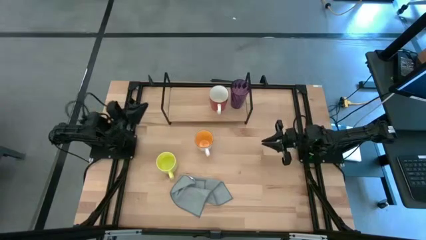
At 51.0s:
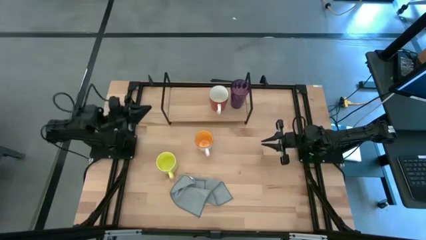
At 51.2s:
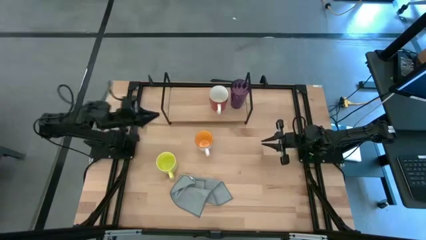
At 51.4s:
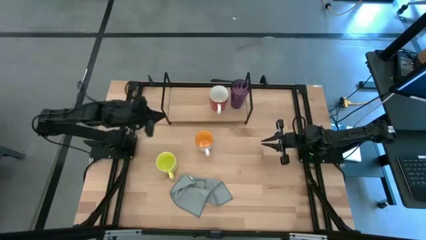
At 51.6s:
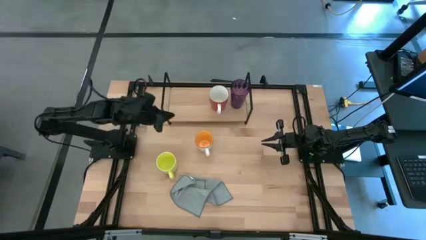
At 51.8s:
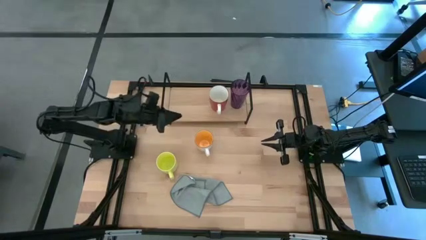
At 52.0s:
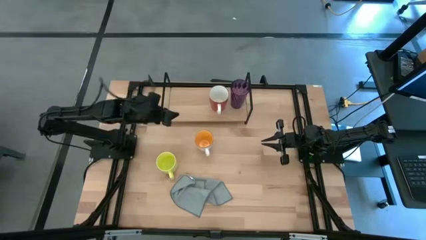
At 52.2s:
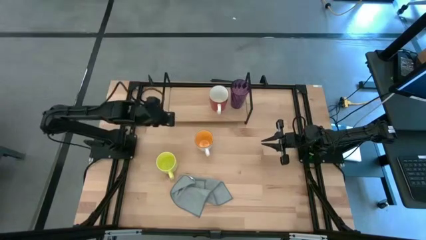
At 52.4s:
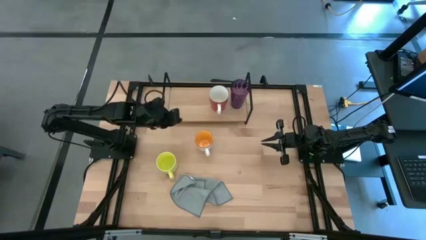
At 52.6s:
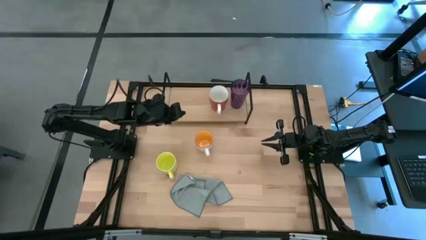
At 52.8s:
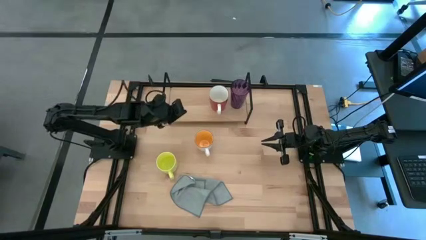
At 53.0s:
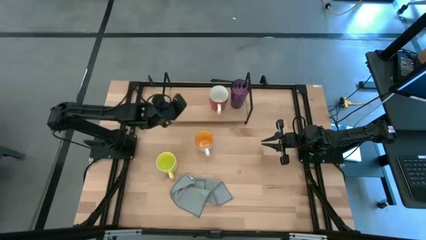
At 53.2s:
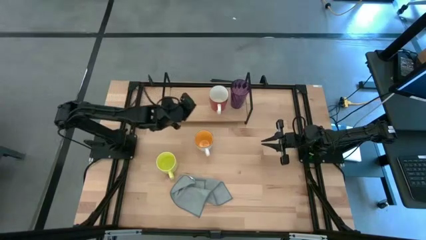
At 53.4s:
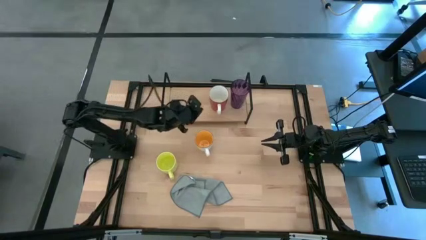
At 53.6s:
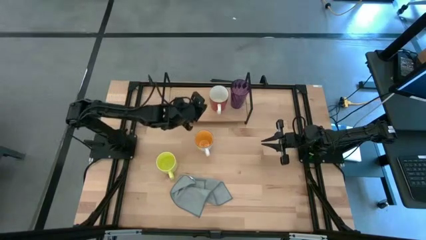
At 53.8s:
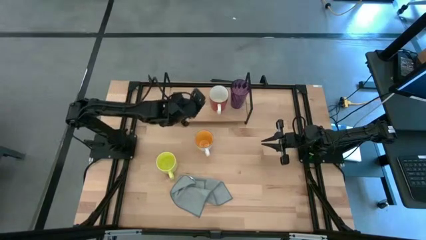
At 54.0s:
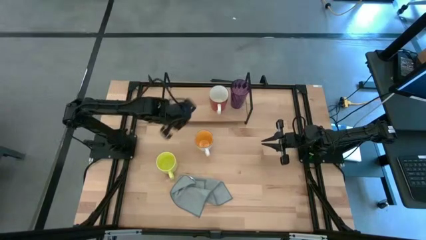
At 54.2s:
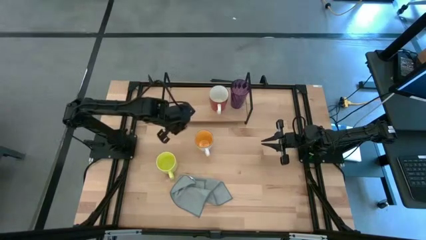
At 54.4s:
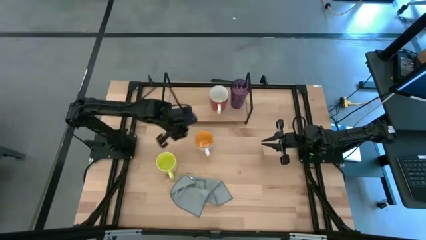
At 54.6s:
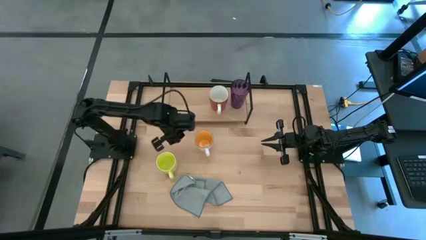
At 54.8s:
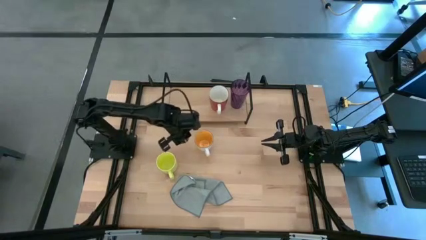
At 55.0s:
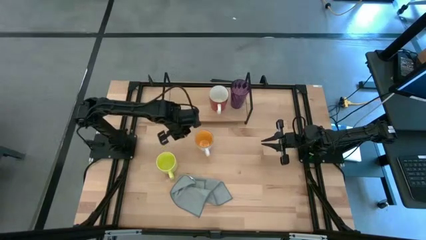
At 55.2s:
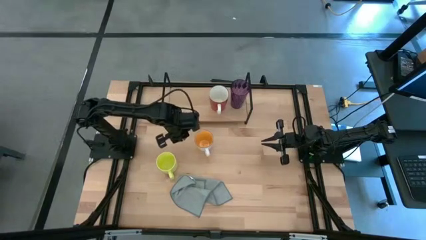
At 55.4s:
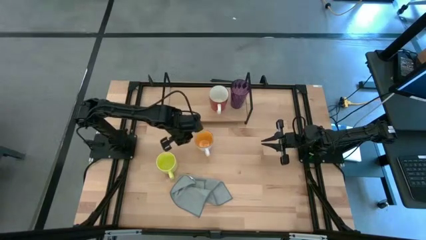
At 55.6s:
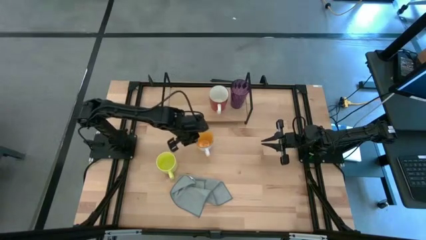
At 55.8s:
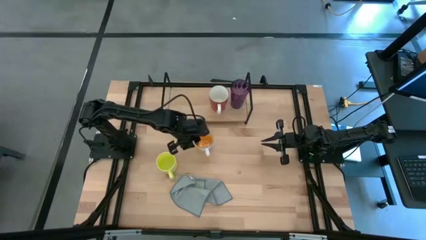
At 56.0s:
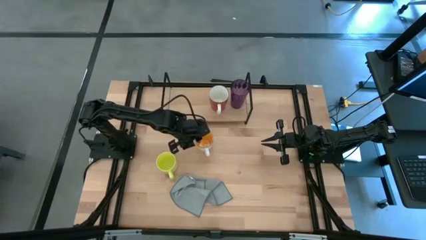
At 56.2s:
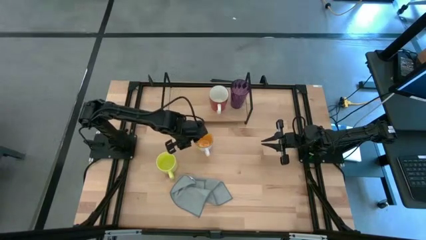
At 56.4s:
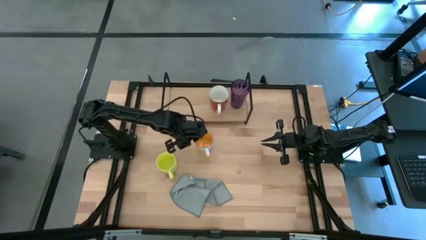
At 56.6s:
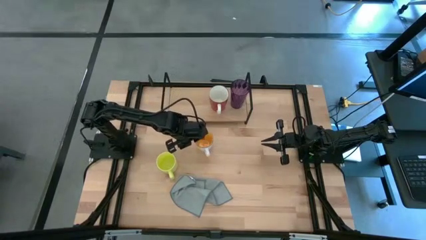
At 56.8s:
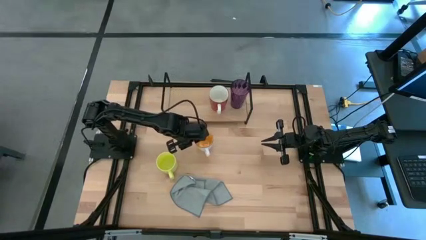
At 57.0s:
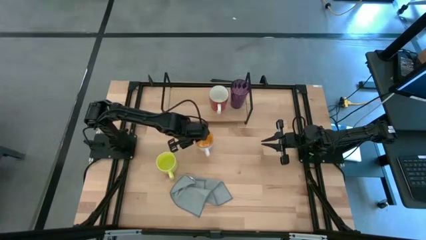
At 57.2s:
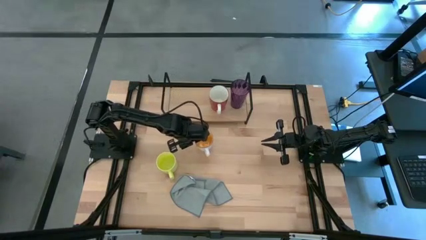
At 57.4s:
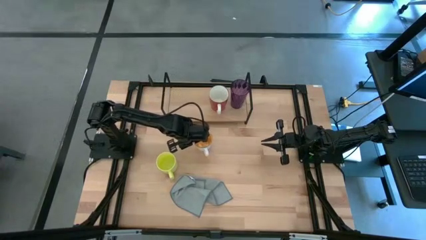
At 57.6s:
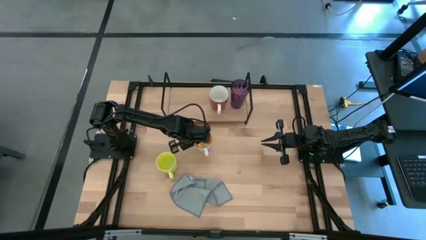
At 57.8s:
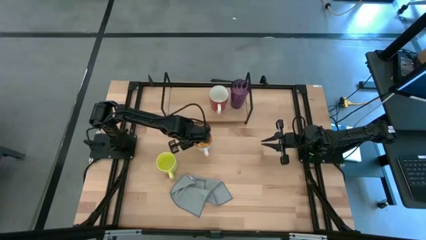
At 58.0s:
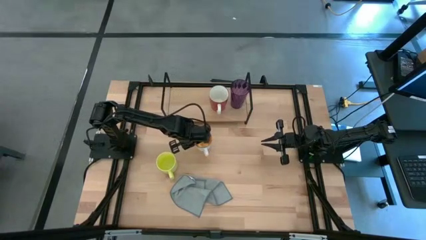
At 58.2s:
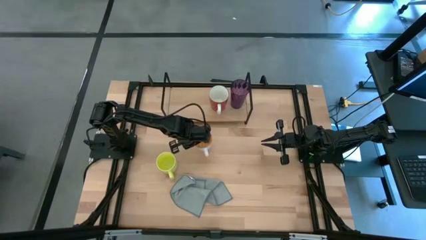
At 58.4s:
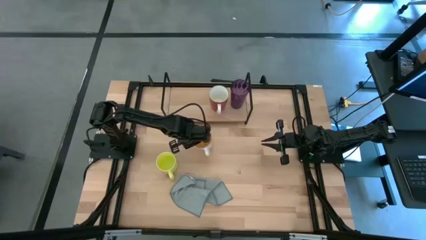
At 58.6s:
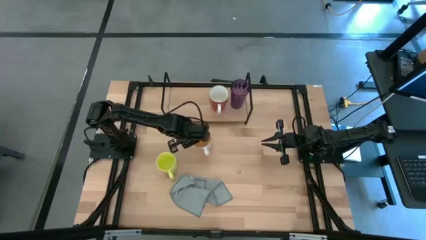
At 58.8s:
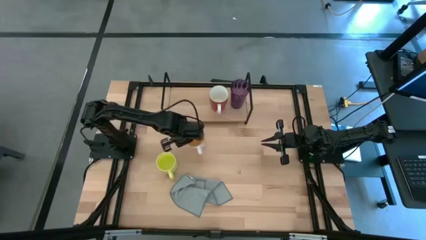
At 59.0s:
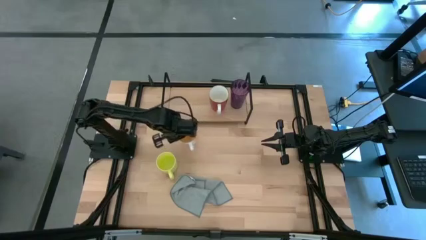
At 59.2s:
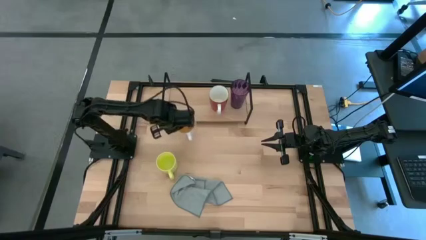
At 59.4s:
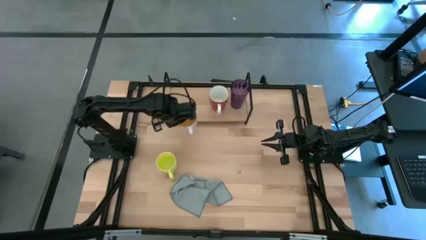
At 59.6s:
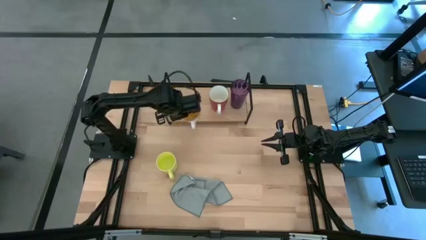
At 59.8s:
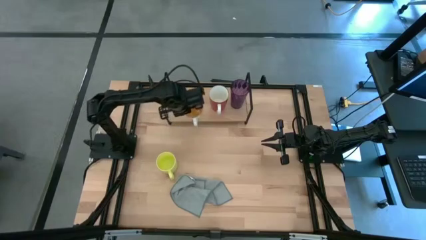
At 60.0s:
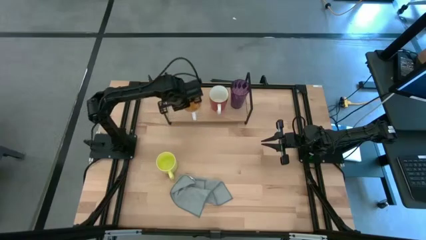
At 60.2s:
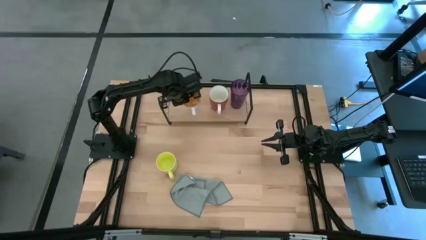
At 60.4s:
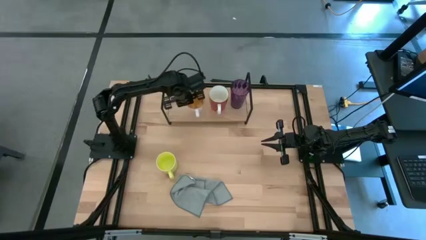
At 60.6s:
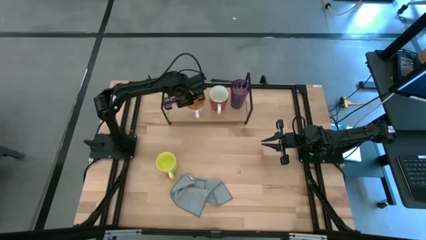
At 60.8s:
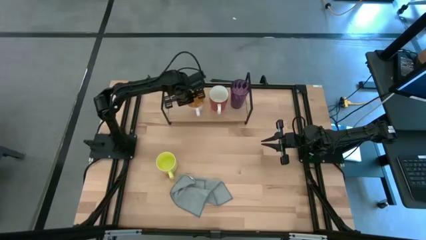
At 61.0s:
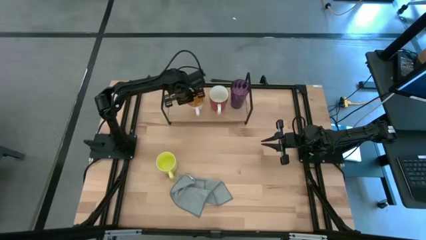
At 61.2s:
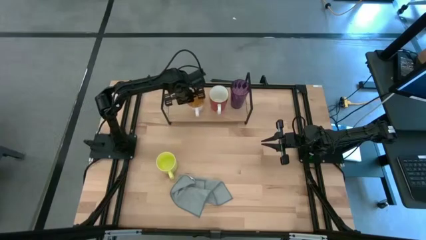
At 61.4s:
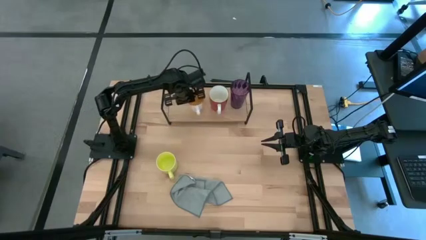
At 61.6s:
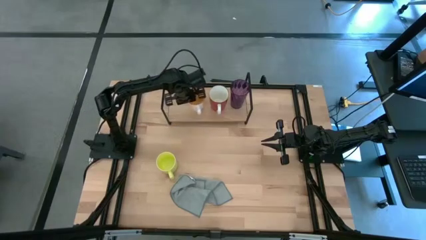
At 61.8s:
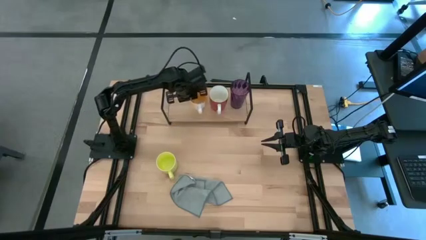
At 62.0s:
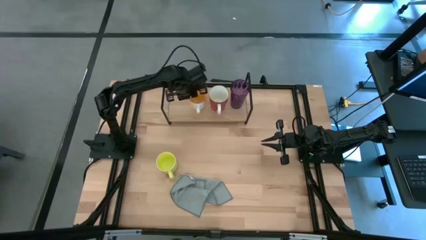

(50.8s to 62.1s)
Task: Stack small to large cups/mugs on shelf
Put the yellow mug on the shelf

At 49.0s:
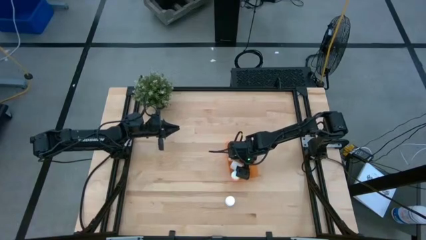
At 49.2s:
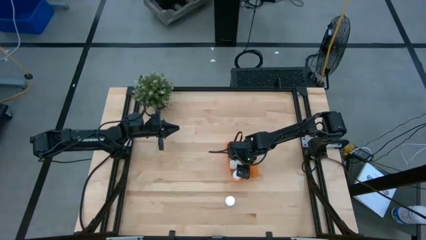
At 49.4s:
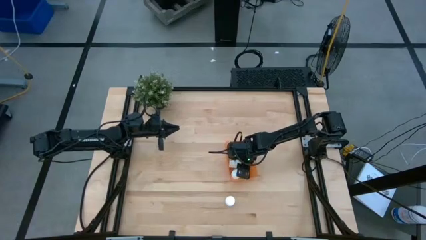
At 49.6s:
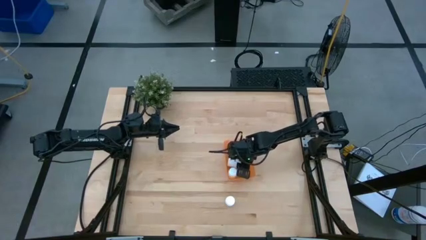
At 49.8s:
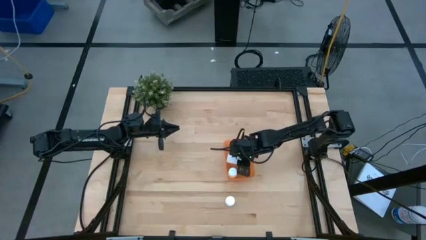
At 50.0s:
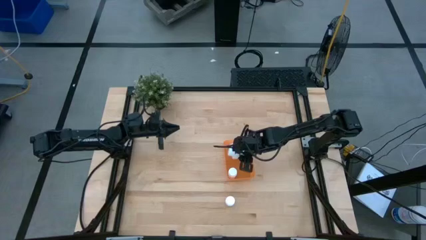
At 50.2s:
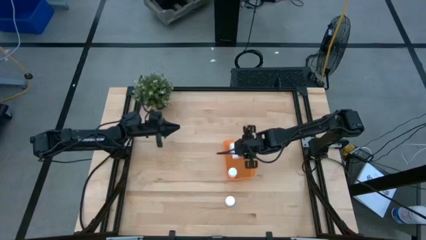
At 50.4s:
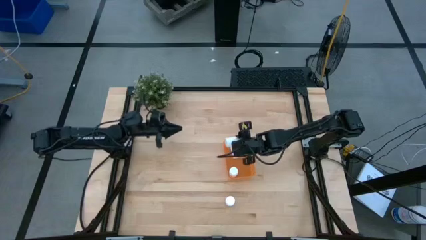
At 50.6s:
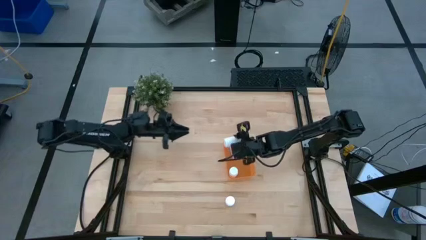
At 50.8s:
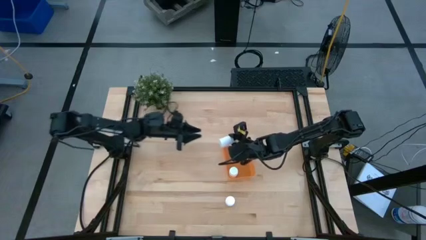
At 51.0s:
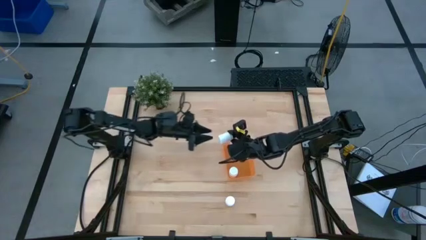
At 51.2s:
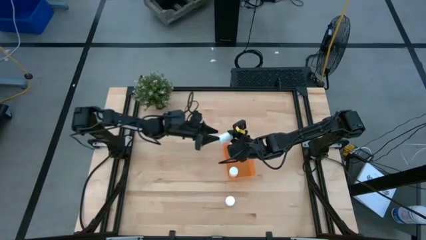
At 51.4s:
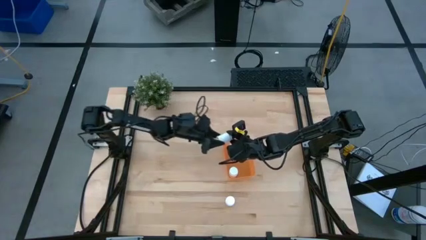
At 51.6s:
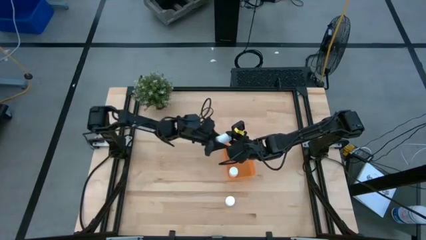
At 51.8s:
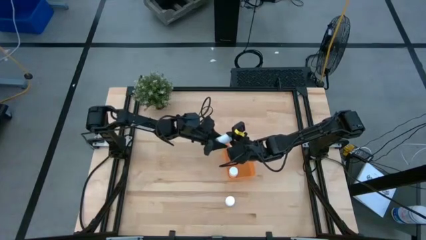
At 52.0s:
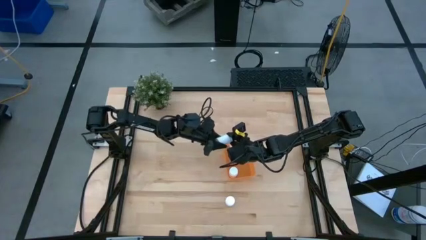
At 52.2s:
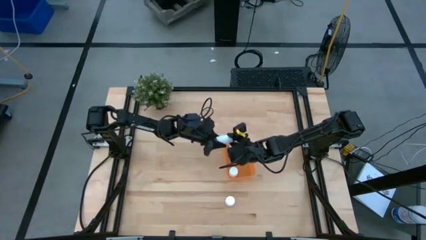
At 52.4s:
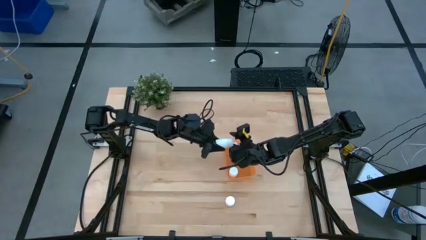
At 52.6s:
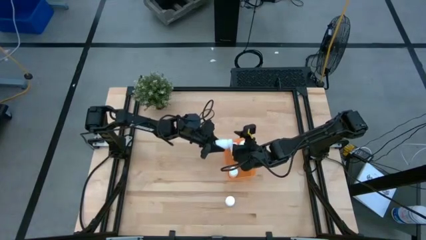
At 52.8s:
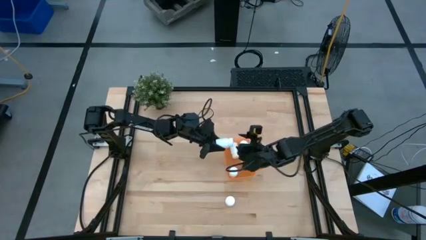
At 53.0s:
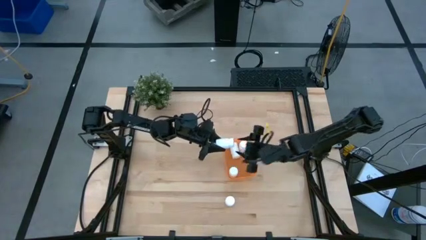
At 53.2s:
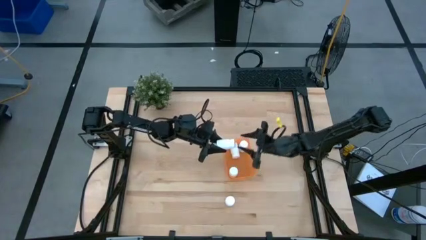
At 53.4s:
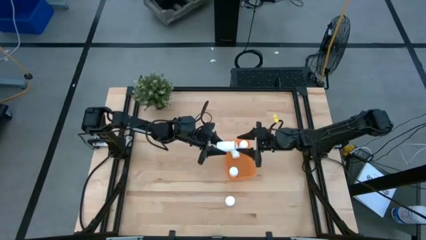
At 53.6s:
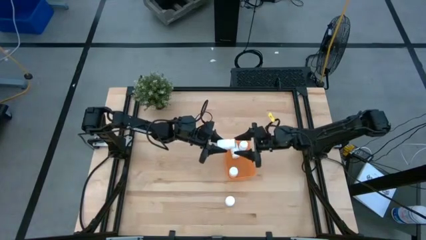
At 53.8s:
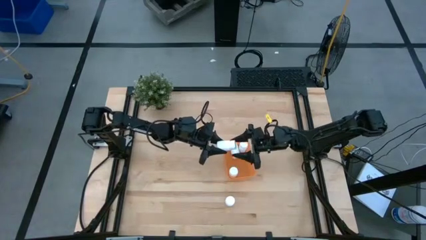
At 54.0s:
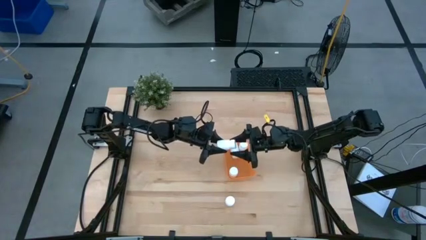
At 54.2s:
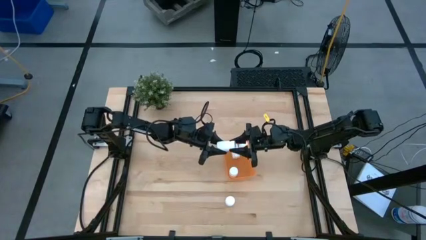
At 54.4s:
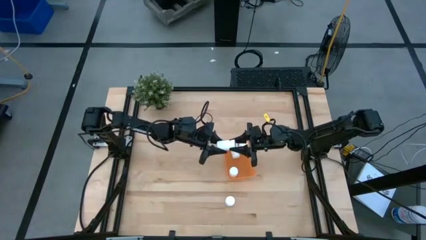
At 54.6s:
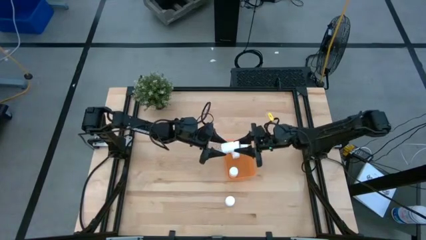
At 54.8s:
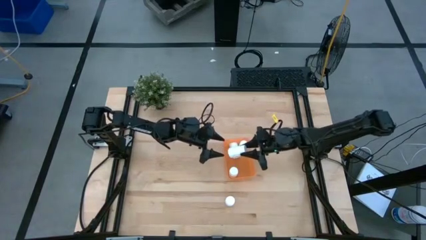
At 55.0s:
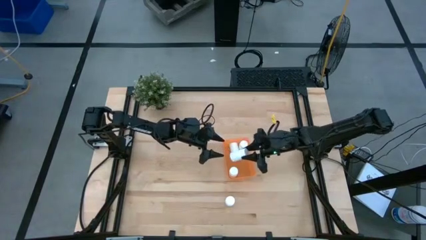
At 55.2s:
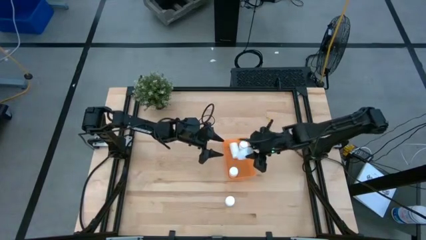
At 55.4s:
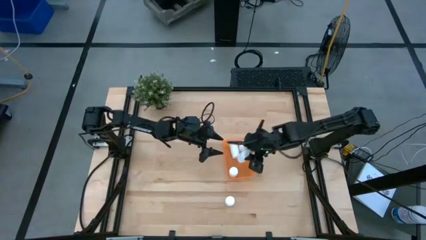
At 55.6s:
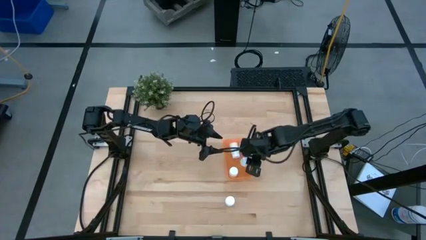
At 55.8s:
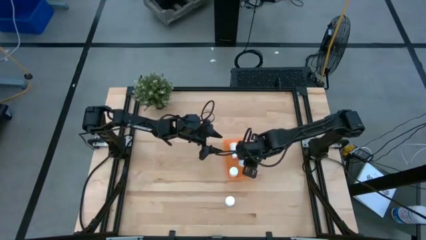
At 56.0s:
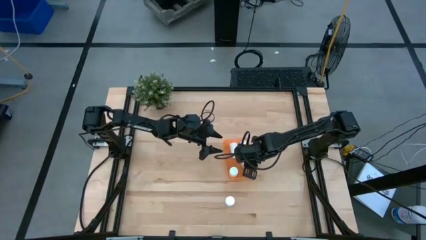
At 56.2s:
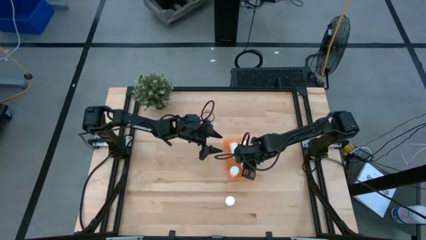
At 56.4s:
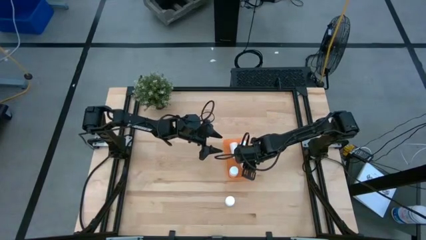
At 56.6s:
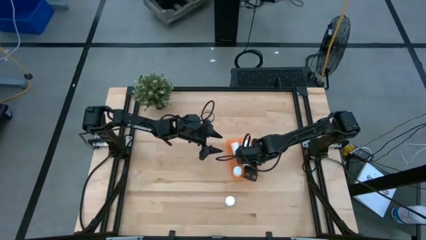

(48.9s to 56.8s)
Task: Pick and place pill bottles into a basket
Adjust the white medicine bottle in the orange bin
